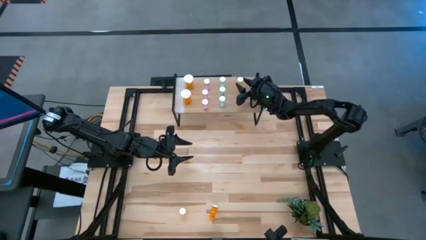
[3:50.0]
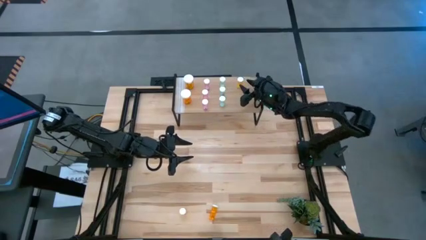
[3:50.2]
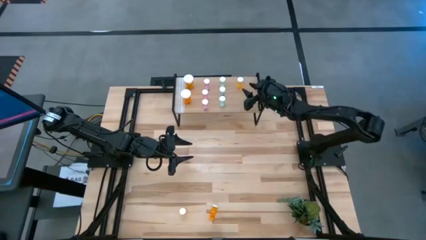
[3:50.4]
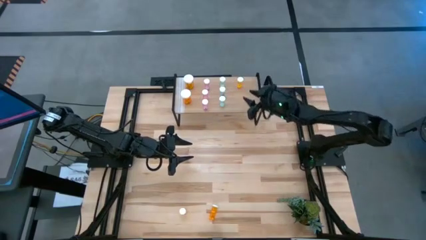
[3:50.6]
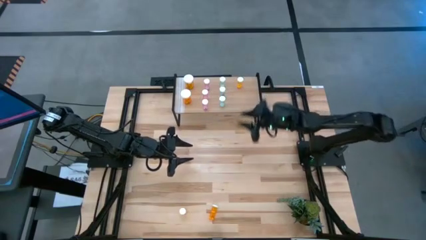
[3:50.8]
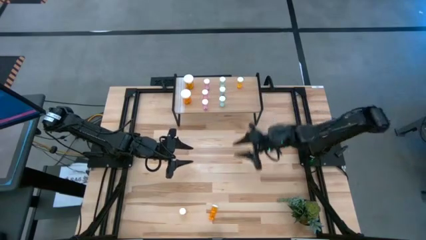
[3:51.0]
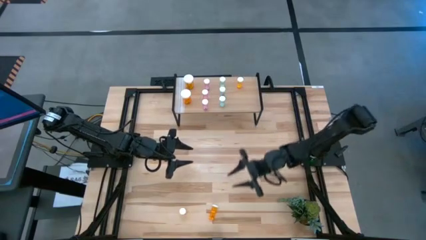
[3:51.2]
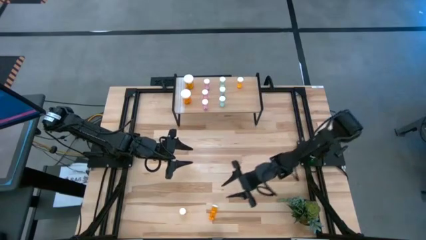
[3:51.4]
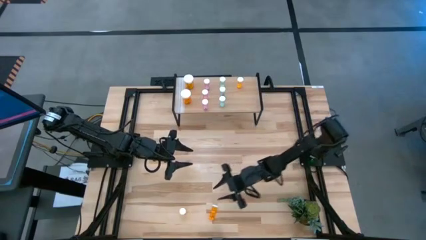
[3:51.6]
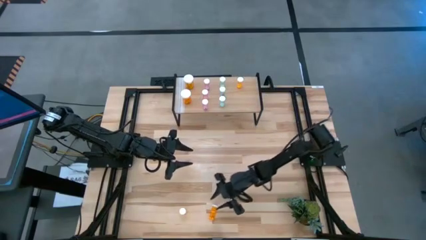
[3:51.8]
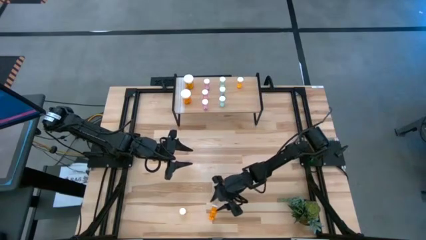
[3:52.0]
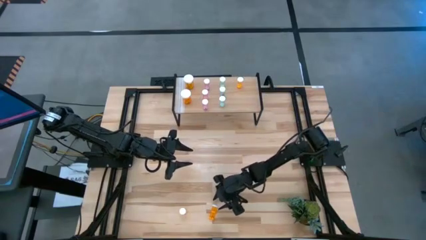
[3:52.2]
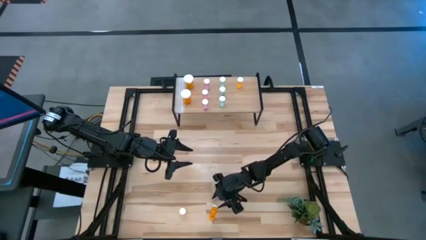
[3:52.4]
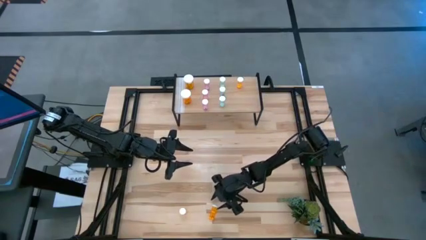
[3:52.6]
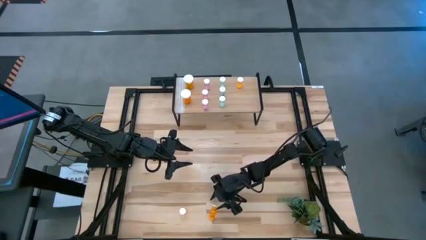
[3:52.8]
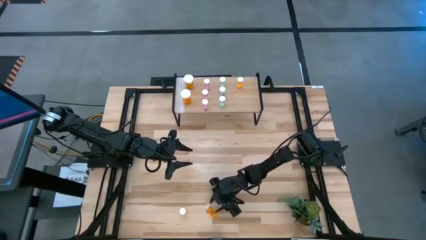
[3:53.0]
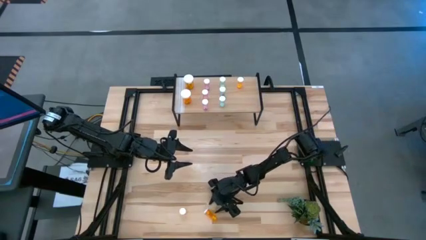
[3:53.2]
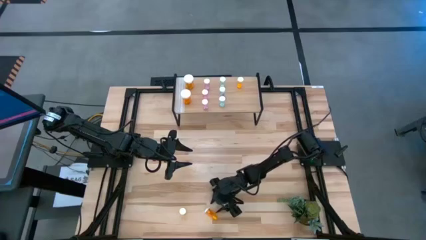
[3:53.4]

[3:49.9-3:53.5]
Task: Pick and place medicine bottles onto shelf by color
Put the right small orange pill bottle aligned with the other small orange pill bottle on the shelf

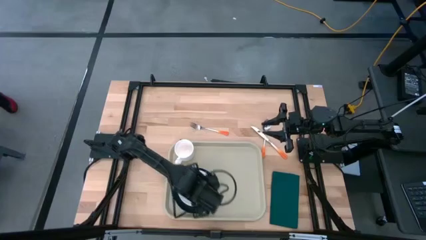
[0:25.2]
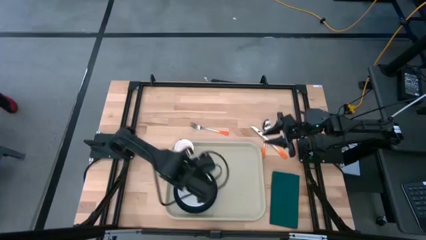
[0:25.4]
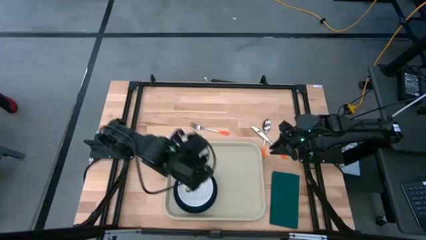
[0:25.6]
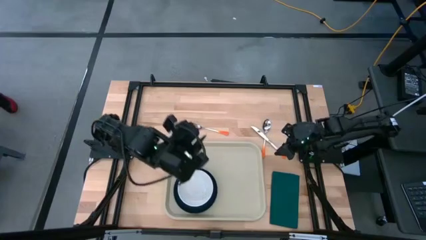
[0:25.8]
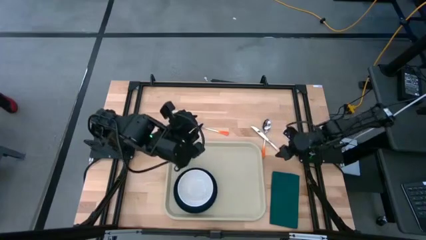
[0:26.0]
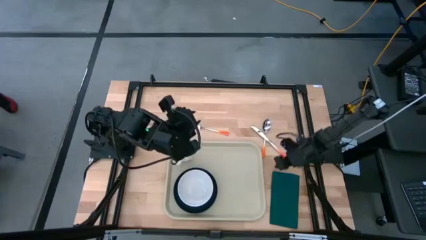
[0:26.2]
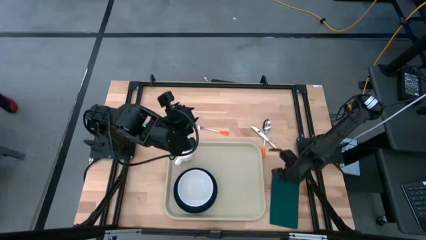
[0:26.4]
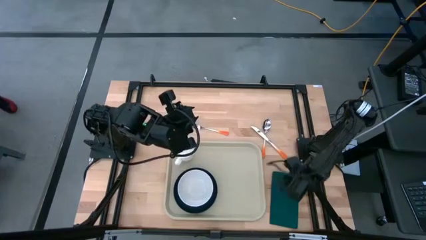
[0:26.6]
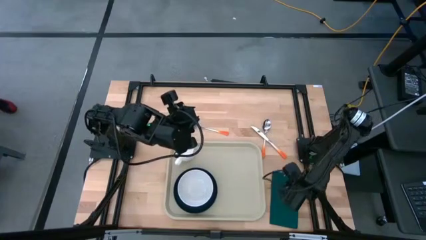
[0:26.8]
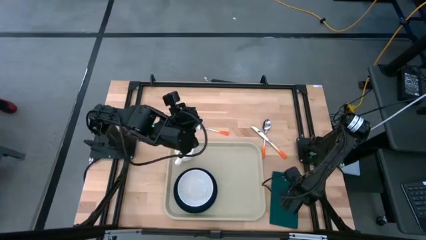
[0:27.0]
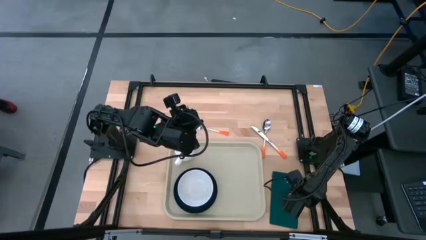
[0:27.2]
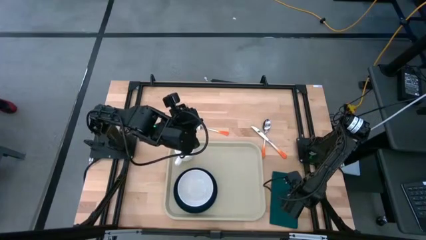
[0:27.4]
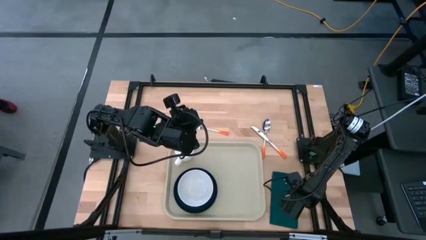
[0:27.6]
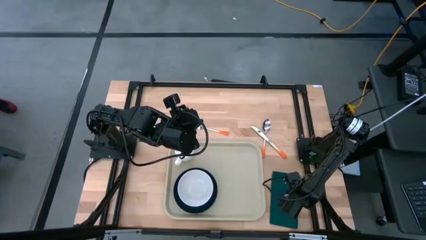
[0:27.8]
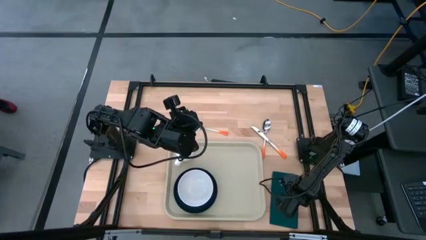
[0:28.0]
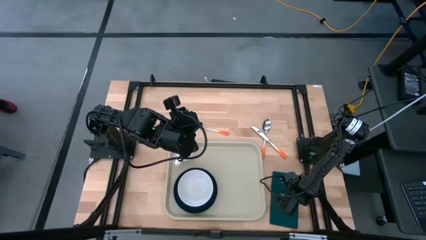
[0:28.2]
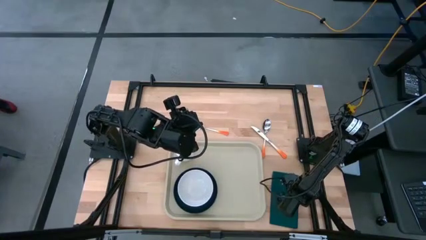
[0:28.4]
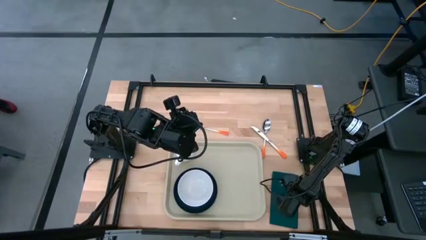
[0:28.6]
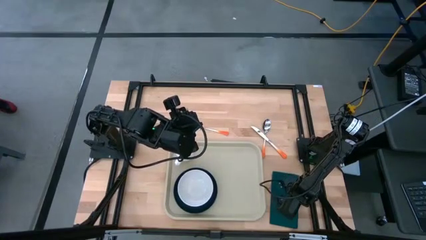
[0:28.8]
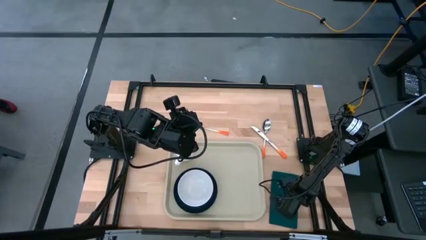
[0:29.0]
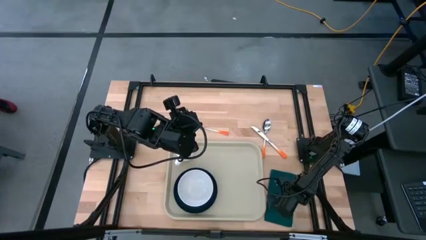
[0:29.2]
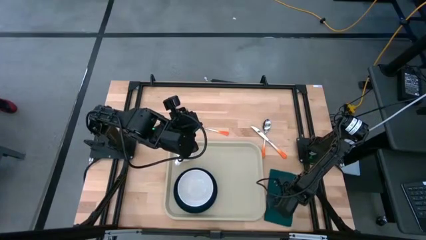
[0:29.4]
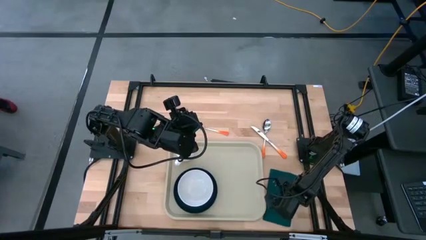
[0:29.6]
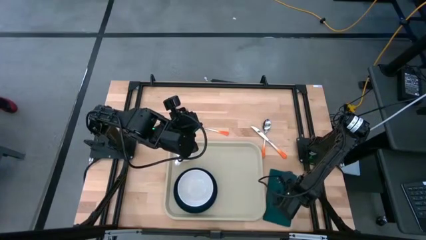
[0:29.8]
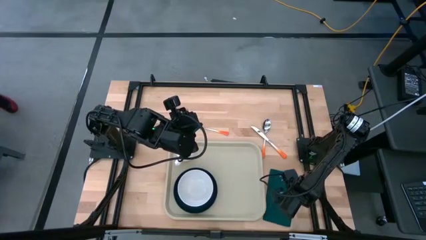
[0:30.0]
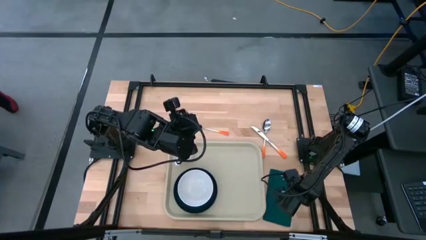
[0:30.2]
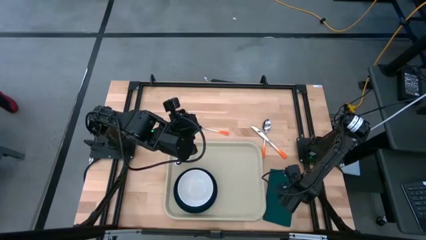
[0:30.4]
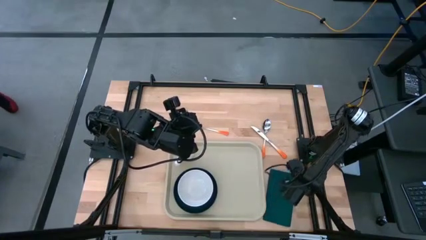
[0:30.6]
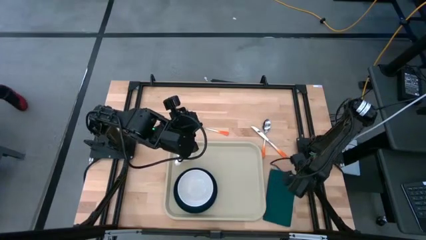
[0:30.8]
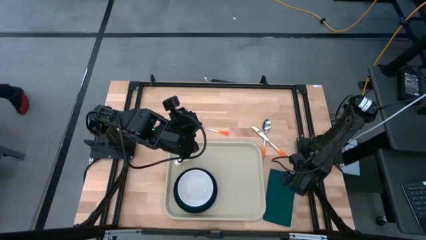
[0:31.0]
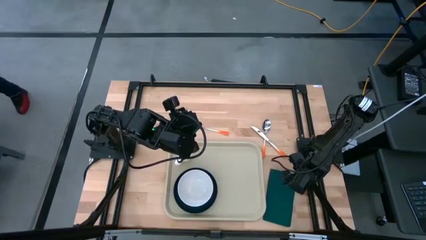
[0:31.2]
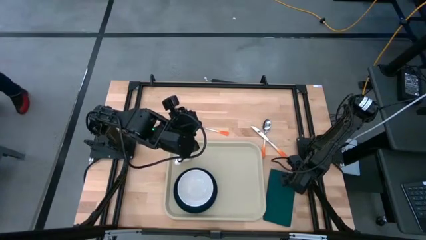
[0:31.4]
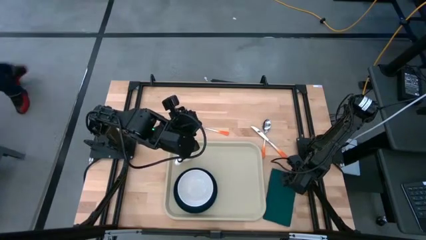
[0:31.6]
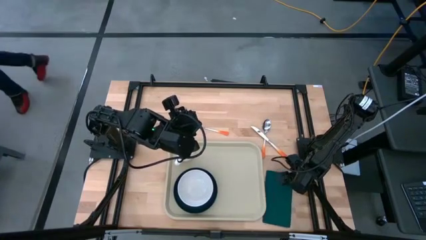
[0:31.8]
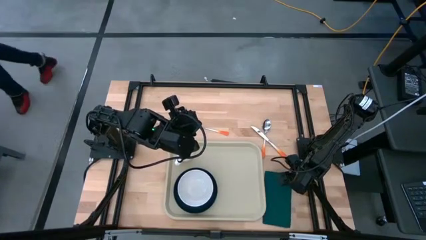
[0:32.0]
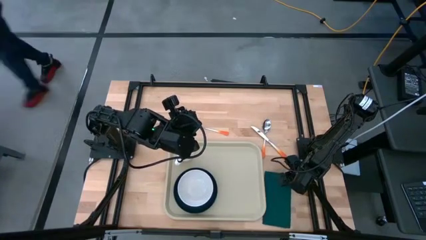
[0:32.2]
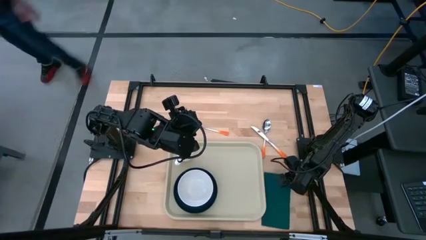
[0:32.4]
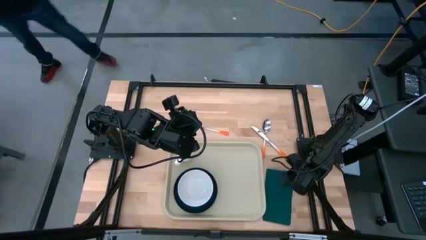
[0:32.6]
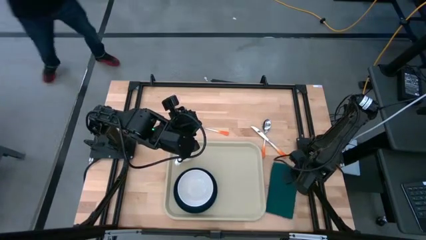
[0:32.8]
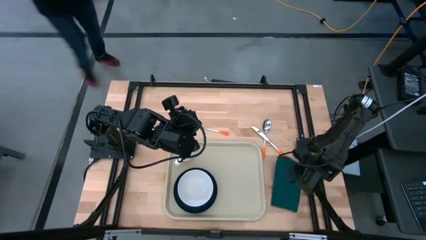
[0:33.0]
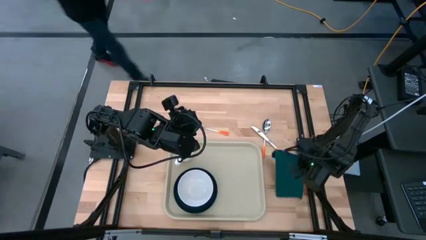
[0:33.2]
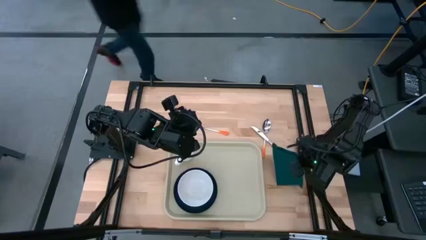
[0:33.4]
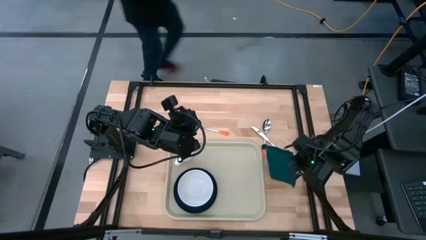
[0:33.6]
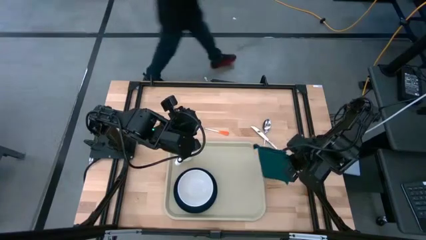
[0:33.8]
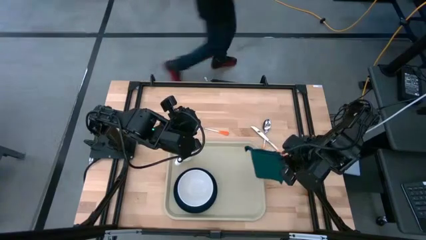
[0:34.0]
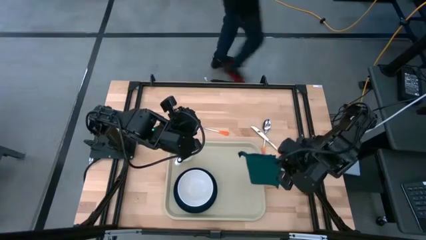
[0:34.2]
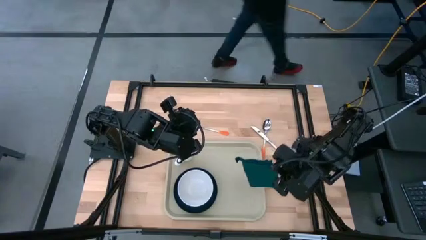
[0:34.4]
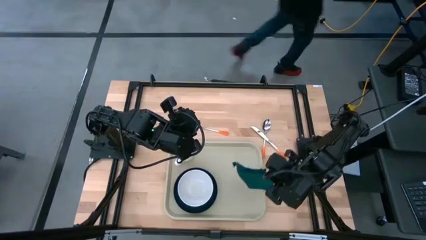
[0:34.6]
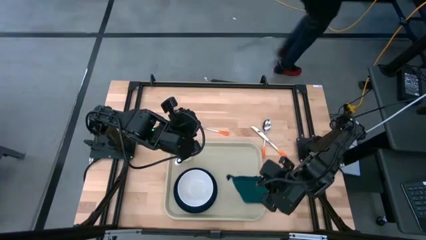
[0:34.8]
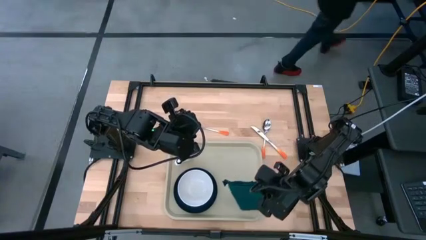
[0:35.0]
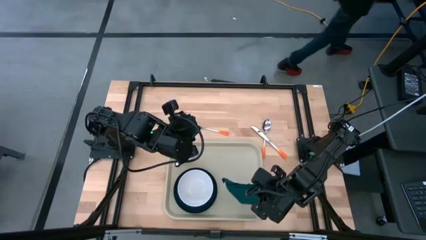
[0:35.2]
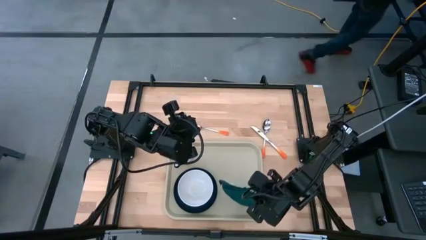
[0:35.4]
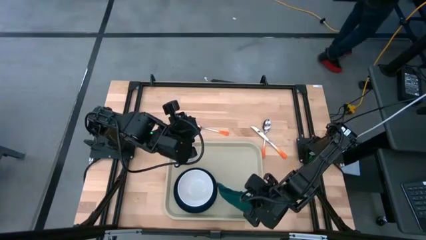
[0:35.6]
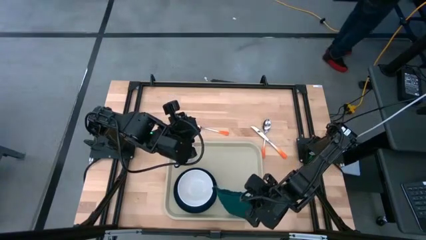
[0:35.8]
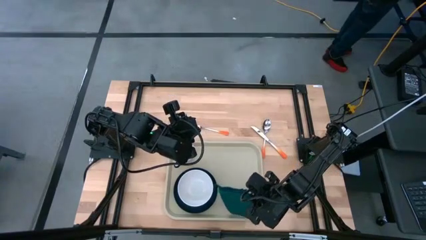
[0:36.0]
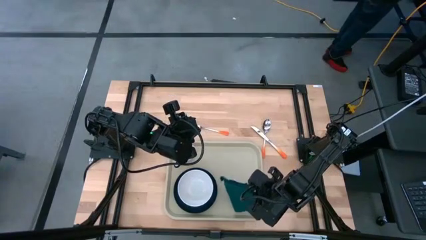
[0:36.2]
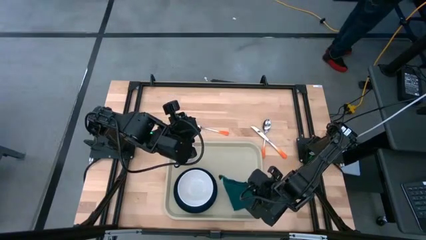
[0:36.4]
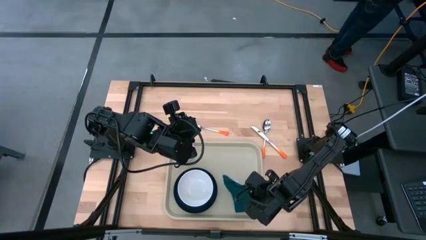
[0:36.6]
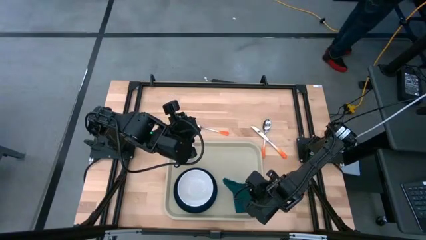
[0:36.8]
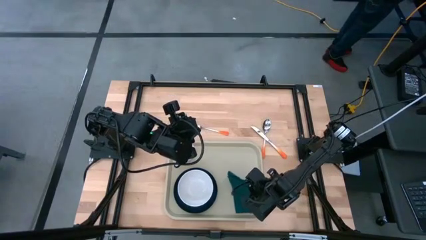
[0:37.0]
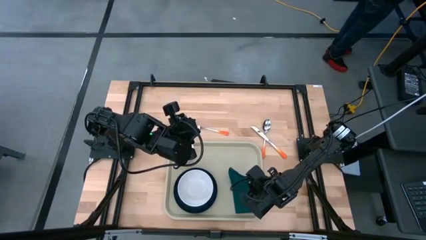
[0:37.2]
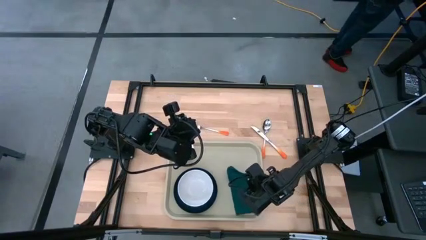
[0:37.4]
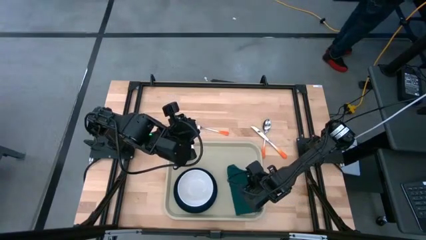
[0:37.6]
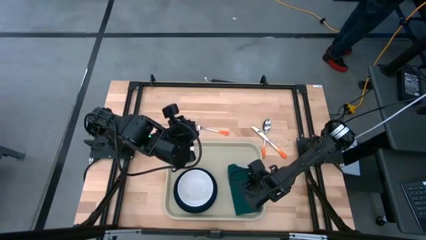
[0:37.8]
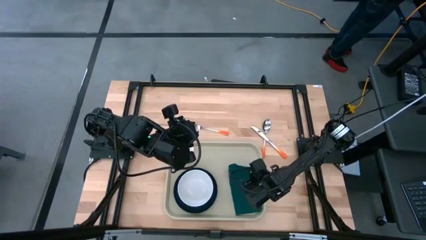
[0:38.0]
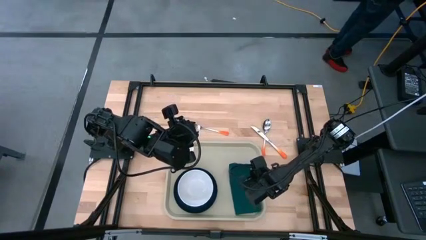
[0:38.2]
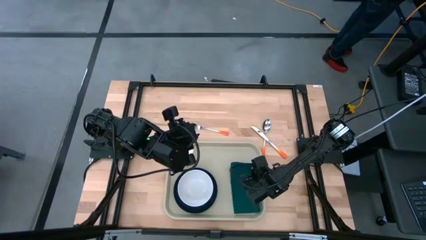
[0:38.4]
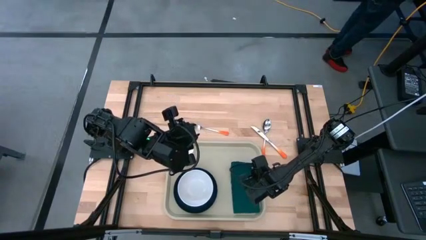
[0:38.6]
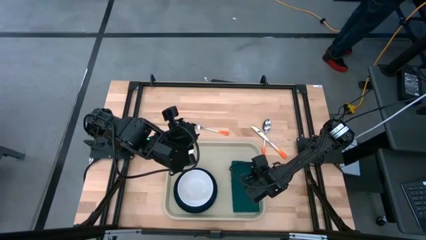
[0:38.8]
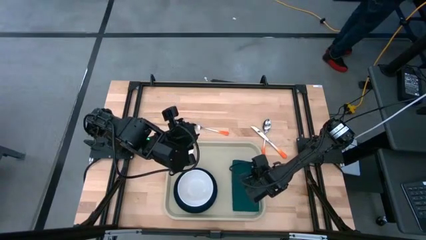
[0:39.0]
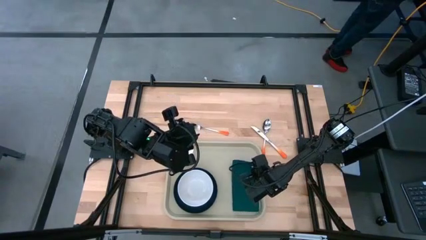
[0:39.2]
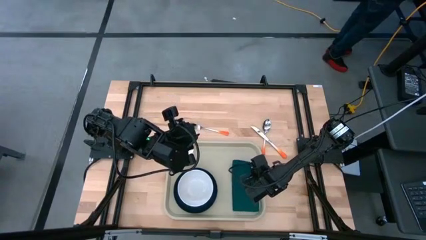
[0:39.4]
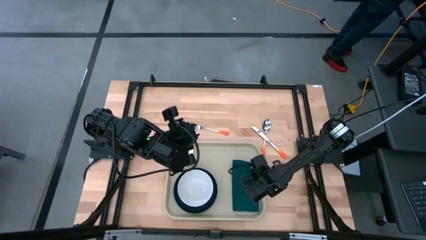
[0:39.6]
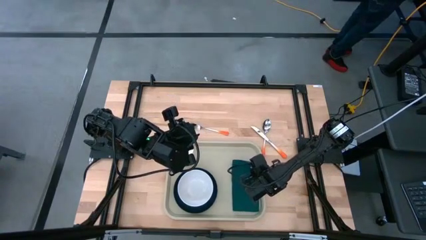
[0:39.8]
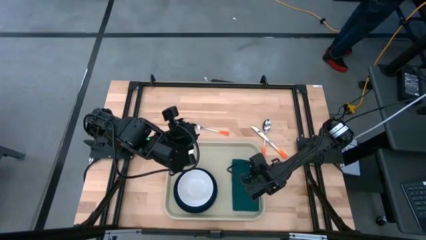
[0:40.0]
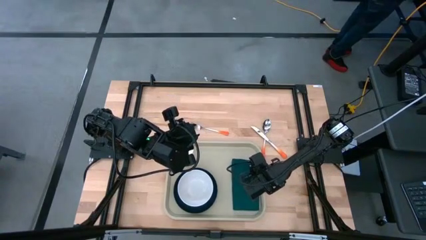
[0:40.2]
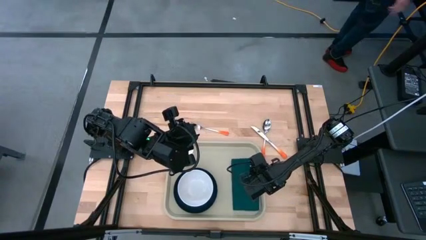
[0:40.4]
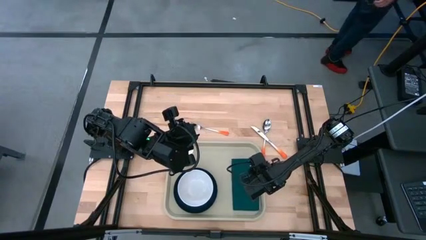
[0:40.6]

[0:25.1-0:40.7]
Task: Set up tray
Put the dark green napkin on the brown serving tray to the right of the black plate
